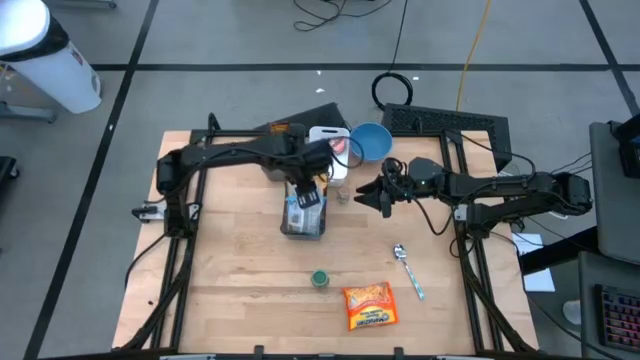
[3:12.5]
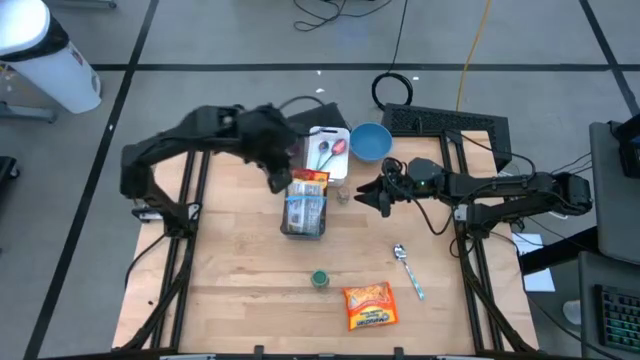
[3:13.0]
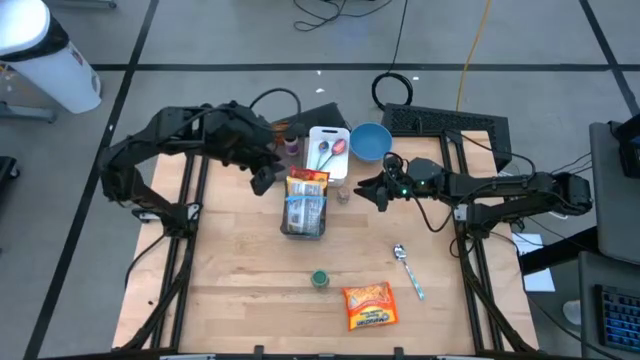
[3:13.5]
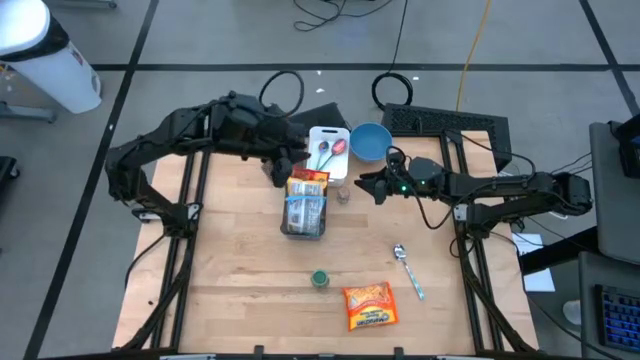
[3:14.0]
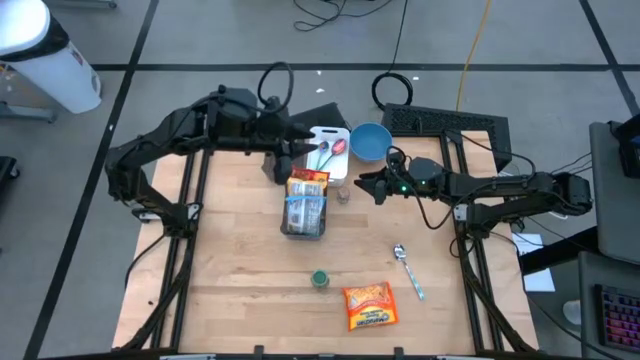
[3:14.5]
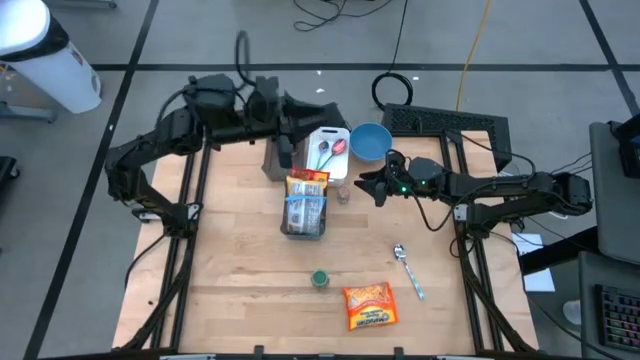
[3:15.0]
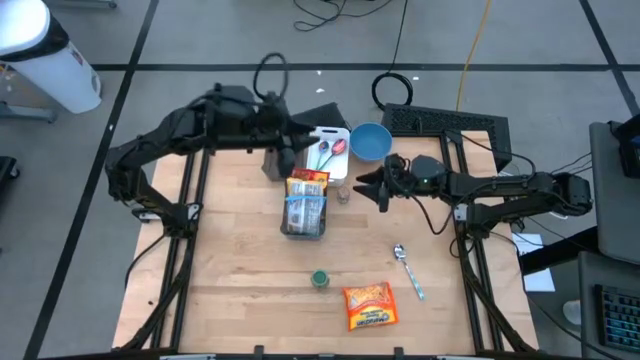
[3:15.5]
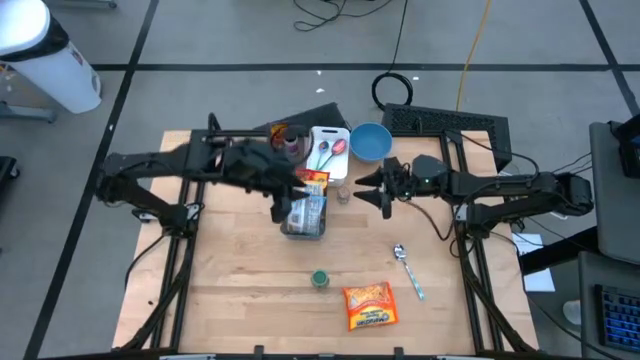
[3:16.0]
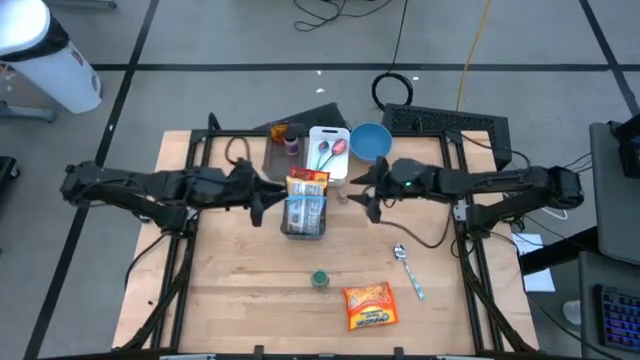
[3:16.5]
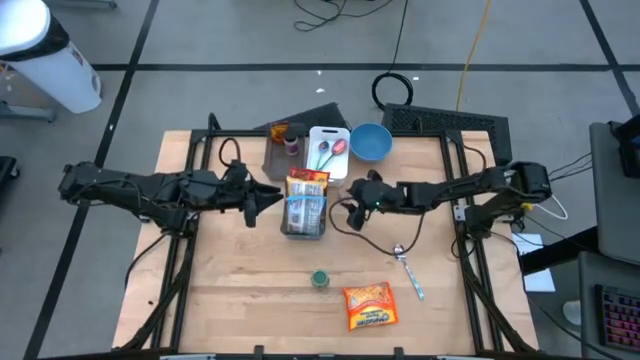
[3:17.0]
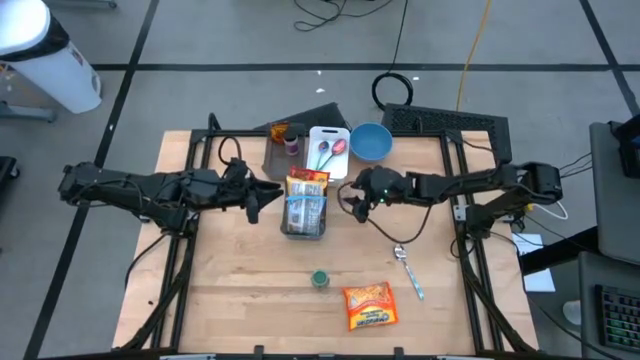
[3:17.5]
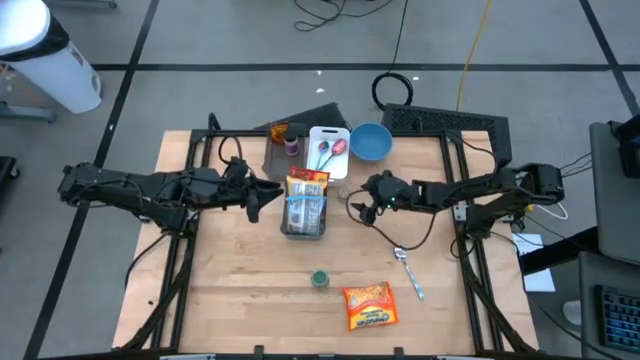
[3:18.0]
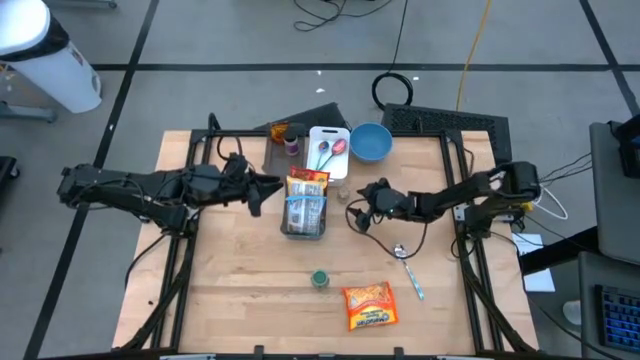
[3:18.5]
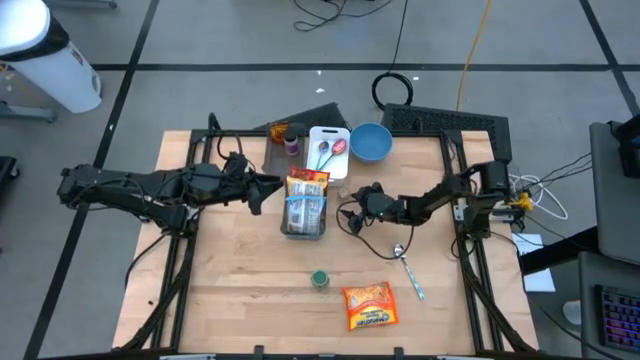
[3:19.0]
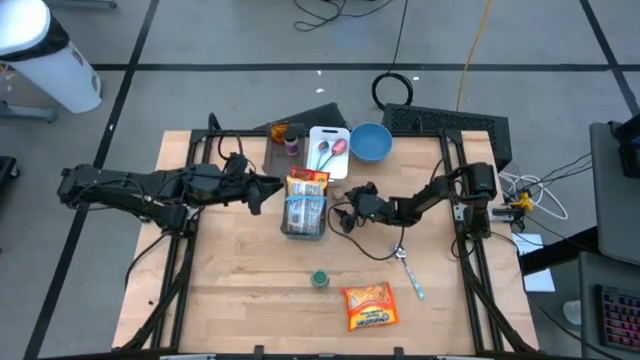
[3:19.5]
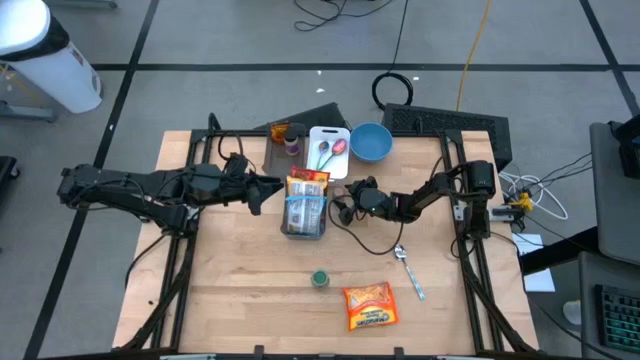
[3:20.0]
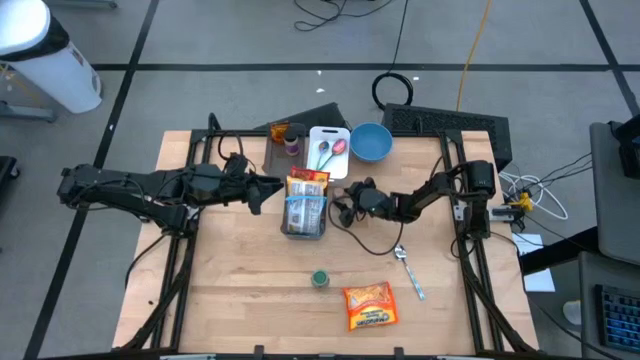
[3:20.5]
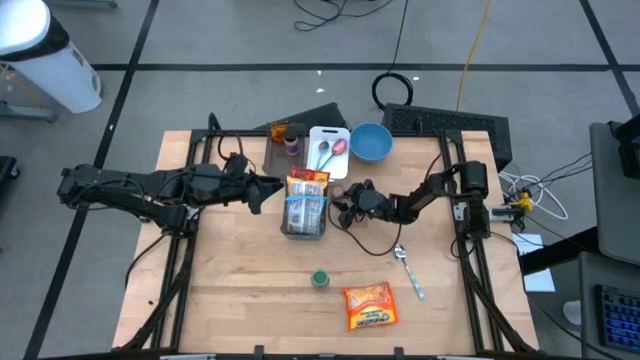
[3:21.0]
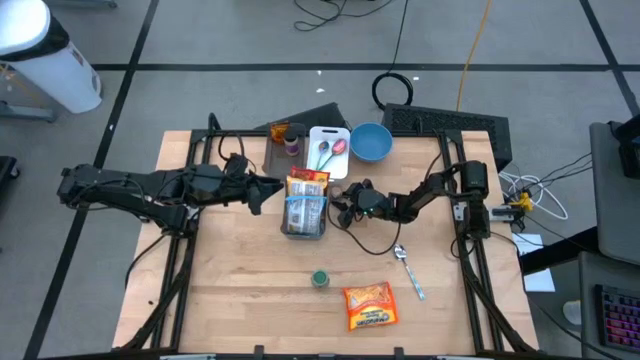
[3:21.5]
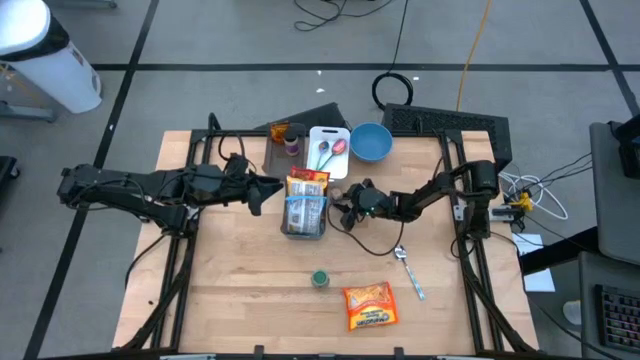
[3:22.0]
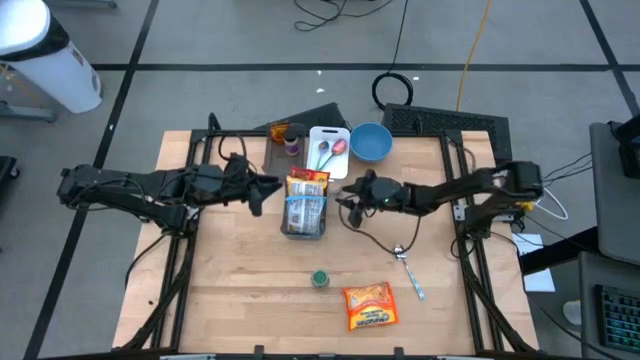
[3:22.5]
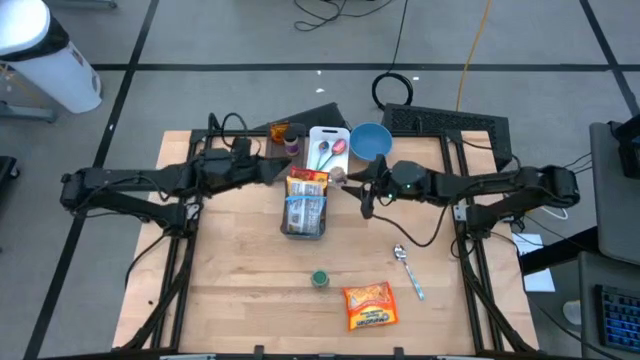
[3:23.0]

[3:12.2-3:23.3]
Task: Pick & Place Food Item
Put the brown spice bottle into the top black bin

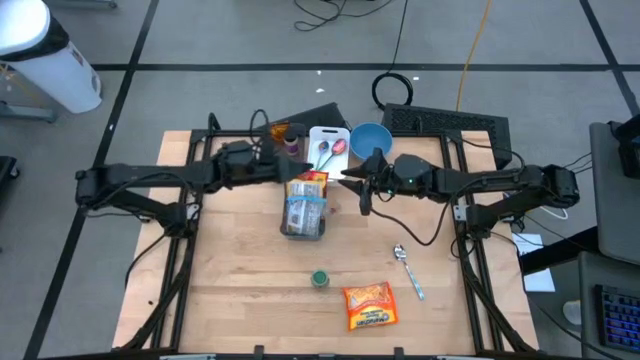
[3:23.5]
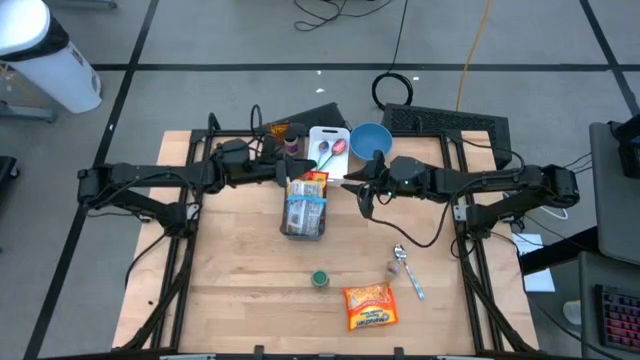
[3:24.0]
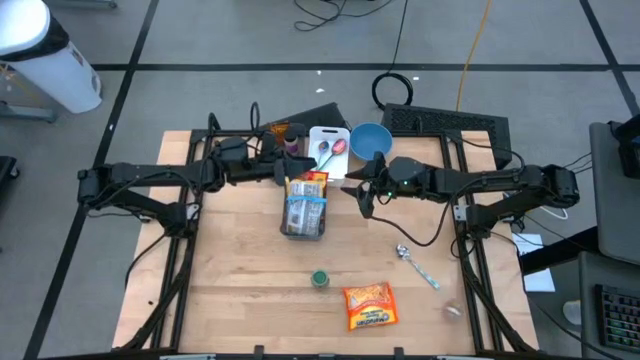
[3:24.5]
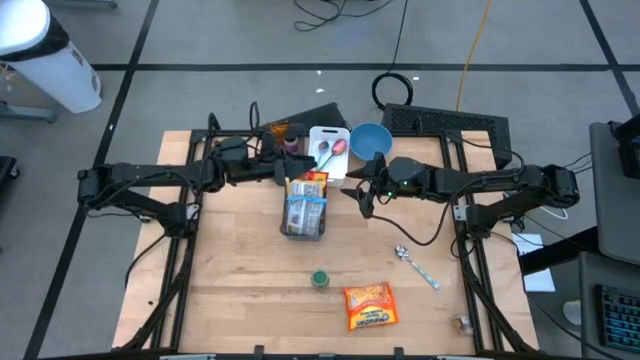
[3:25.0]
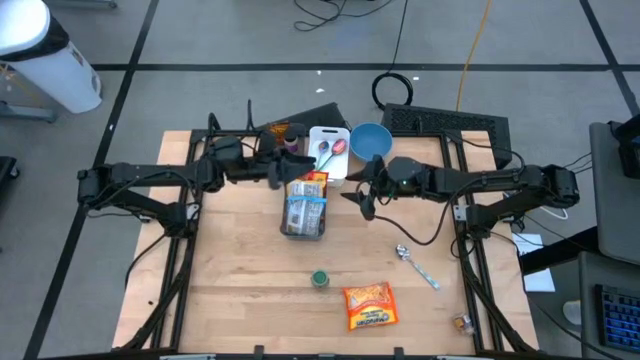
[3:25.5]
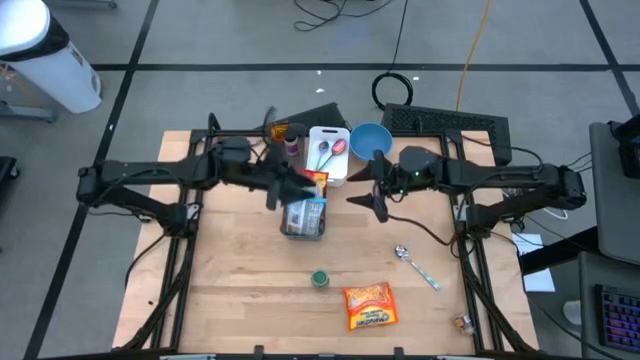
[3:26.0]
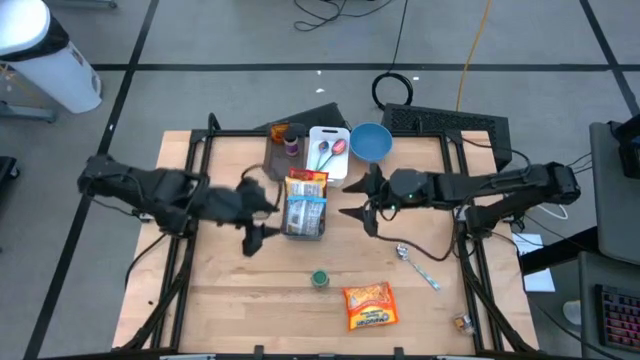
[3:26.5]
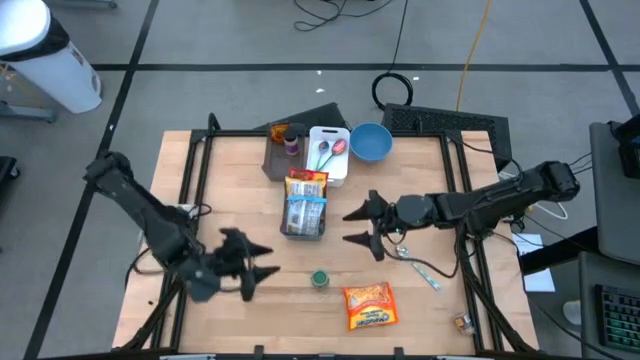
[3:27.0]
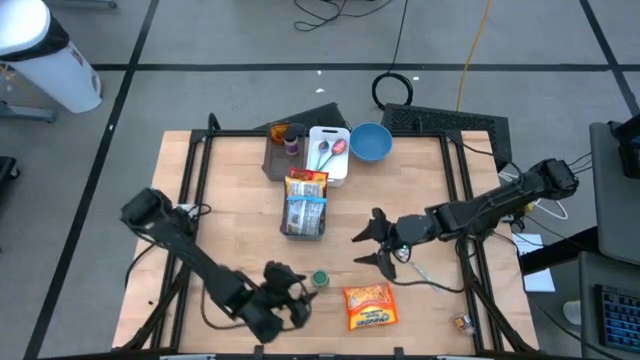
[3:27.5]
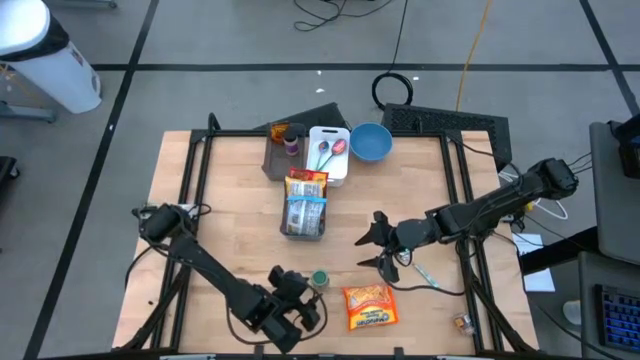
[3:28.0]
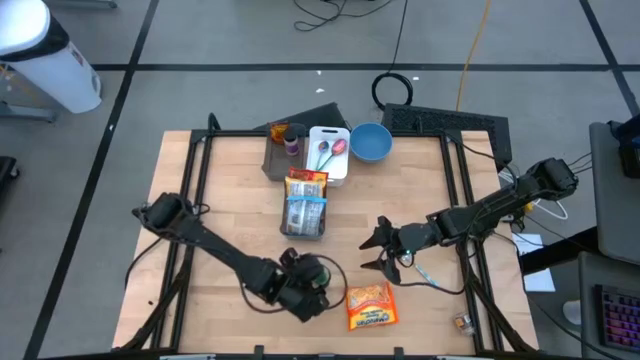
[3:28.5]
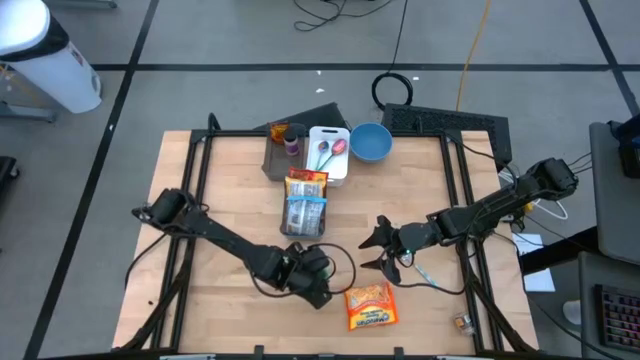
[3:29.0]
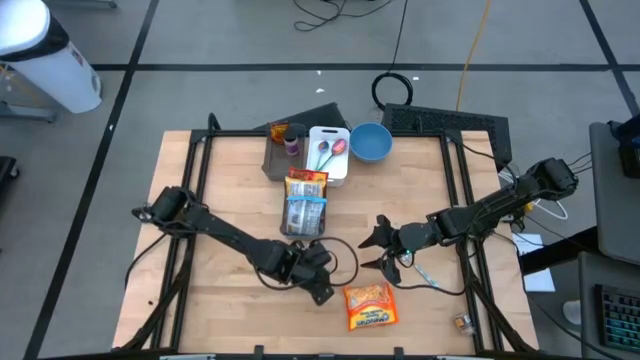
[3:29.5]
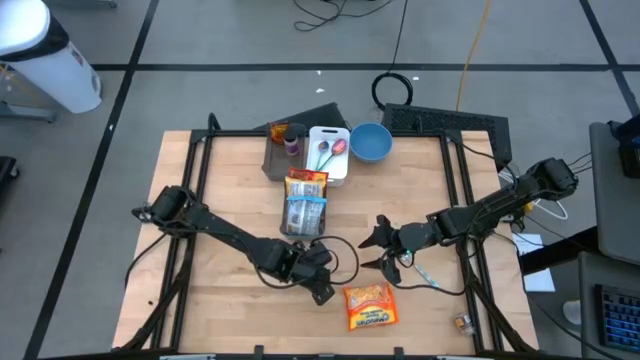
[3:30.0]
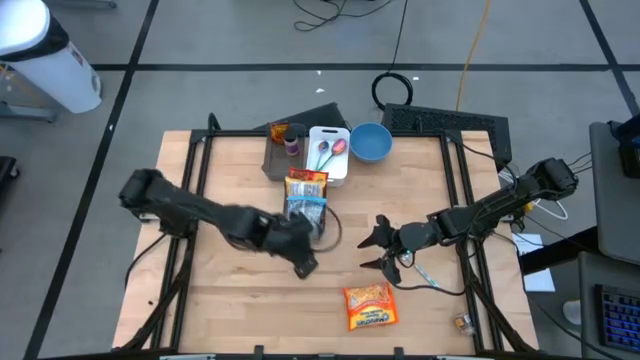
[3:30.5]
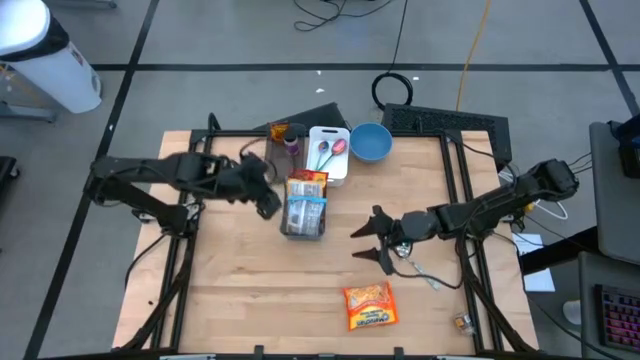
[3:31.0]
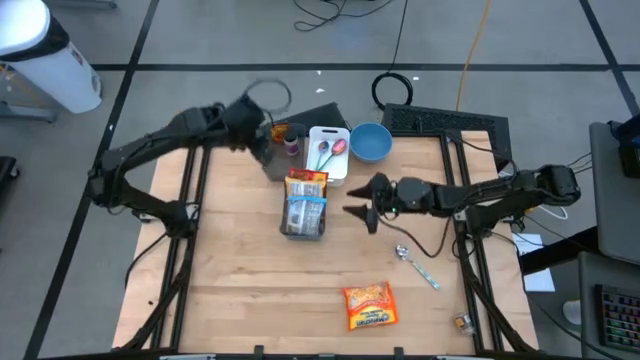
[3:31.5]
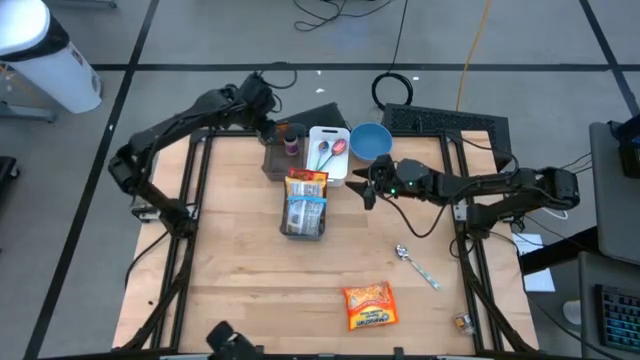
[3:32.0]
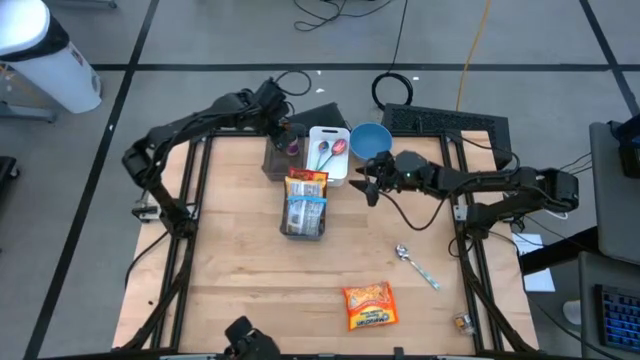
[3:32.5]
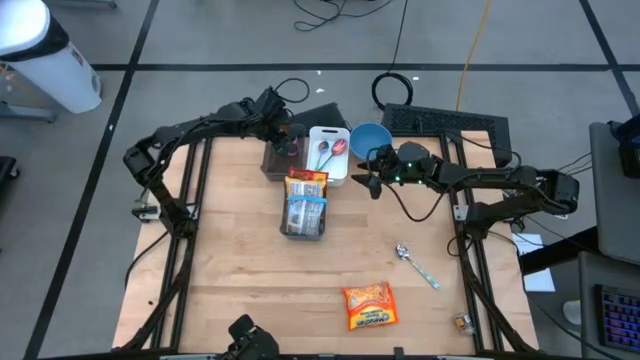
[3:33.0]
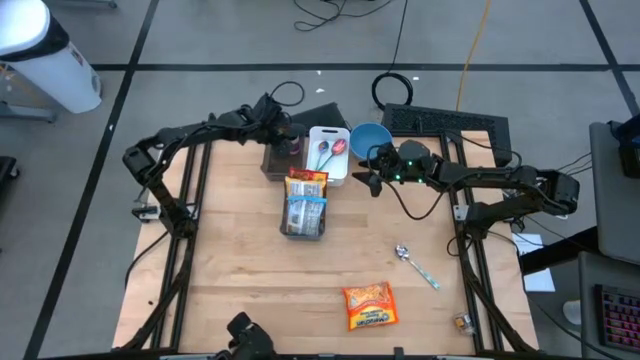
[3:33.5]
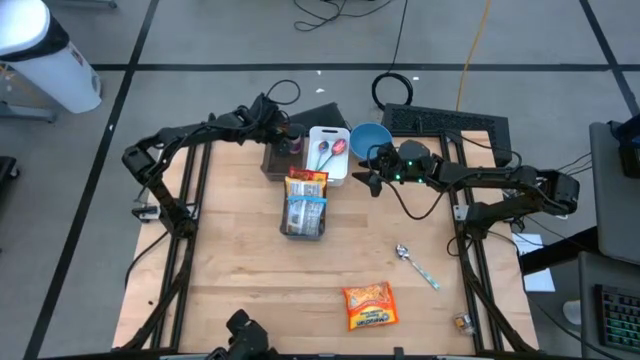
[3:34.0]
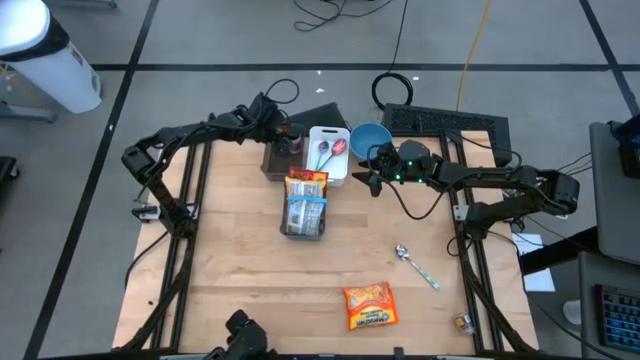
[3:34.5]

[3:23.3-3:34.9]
Put the green spice bottle into the top black bin
